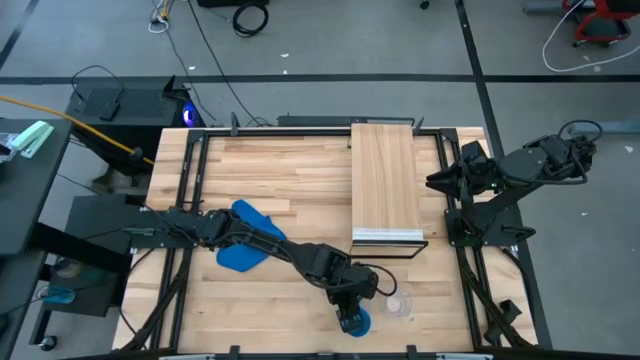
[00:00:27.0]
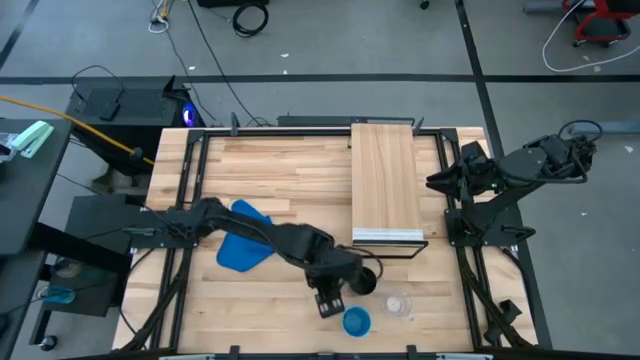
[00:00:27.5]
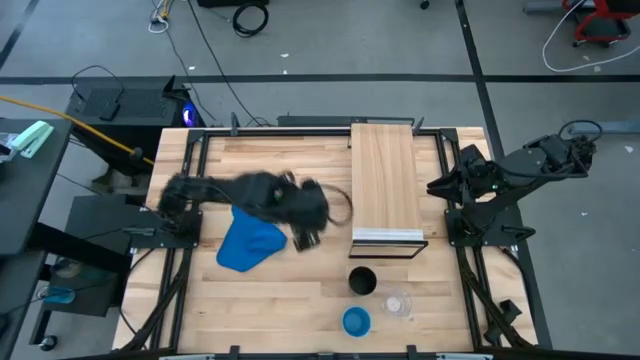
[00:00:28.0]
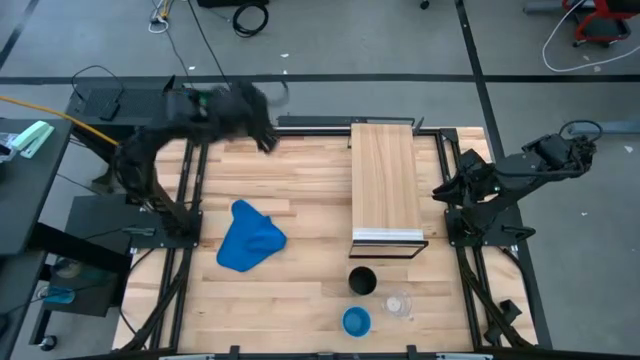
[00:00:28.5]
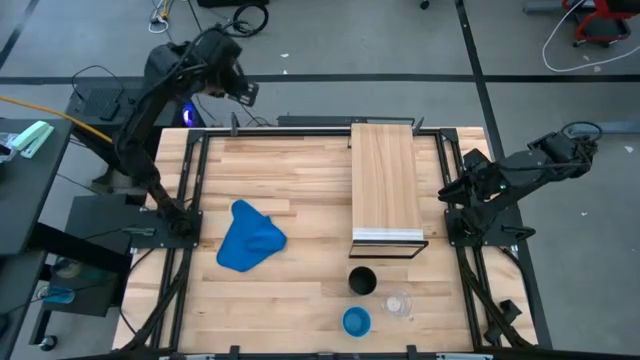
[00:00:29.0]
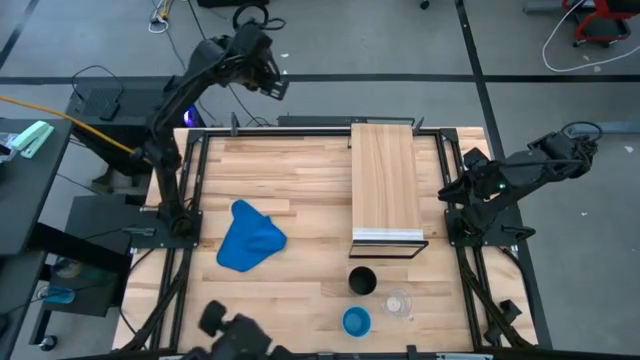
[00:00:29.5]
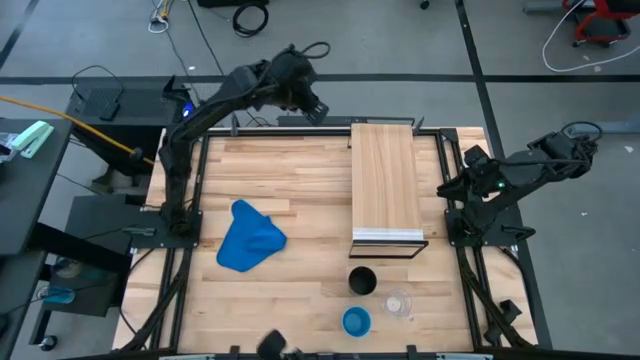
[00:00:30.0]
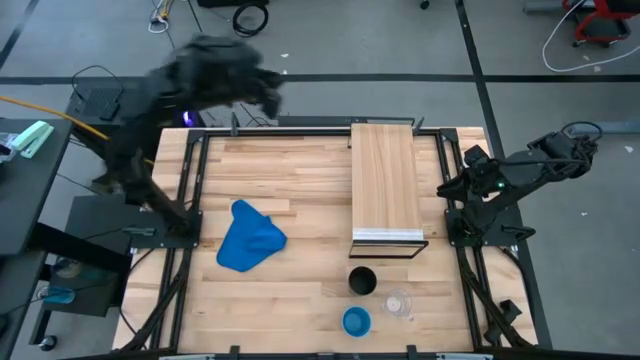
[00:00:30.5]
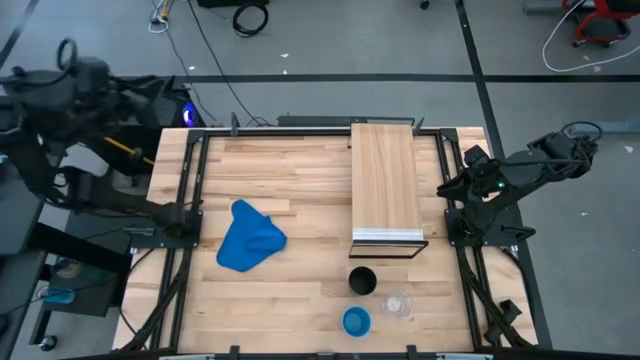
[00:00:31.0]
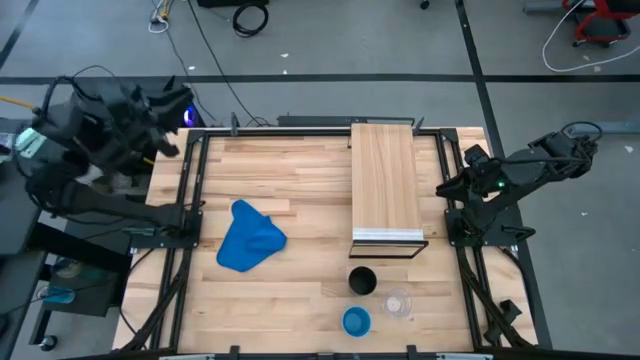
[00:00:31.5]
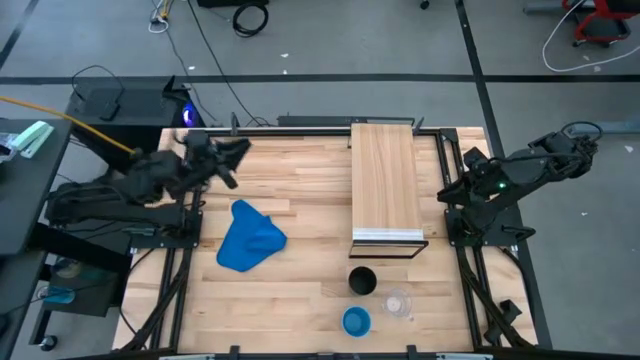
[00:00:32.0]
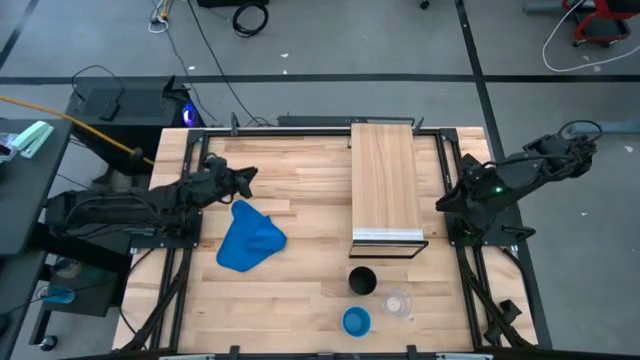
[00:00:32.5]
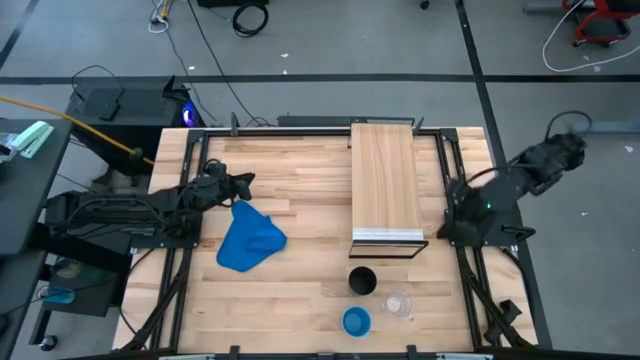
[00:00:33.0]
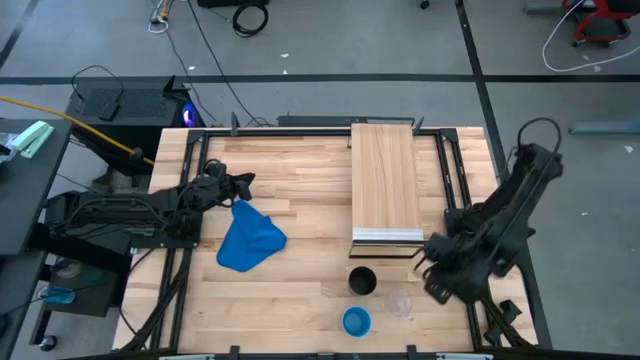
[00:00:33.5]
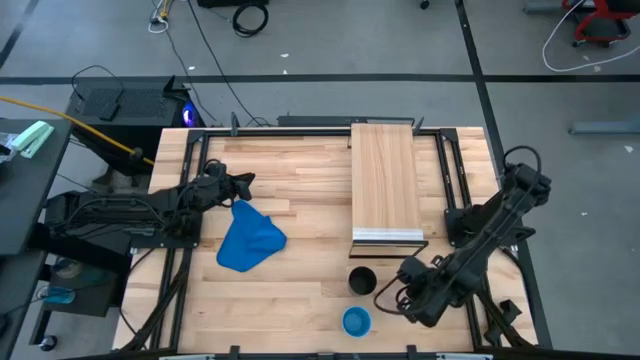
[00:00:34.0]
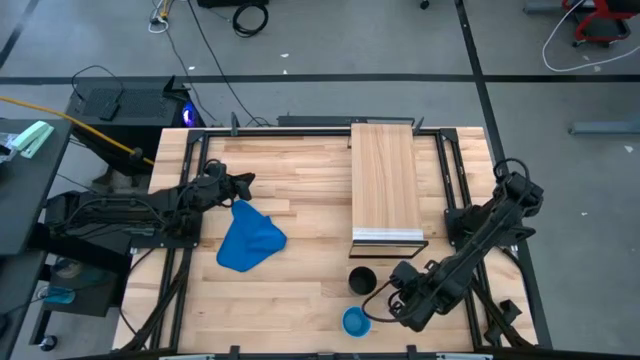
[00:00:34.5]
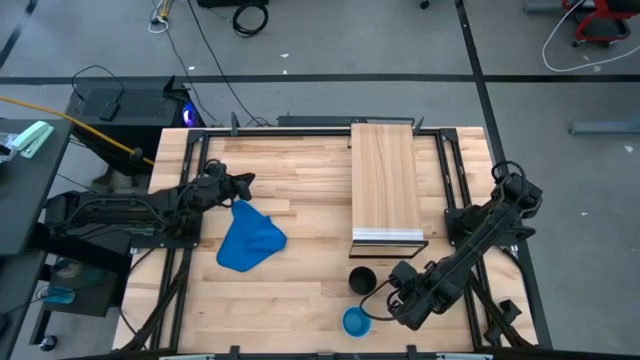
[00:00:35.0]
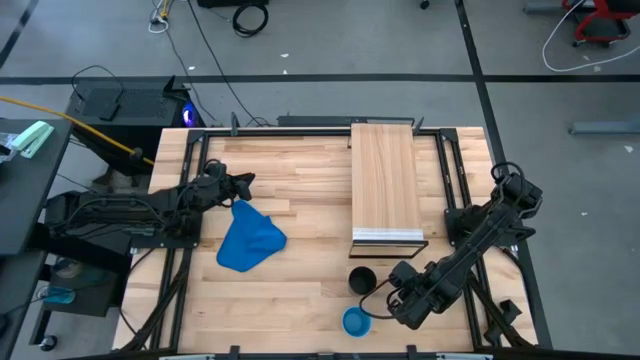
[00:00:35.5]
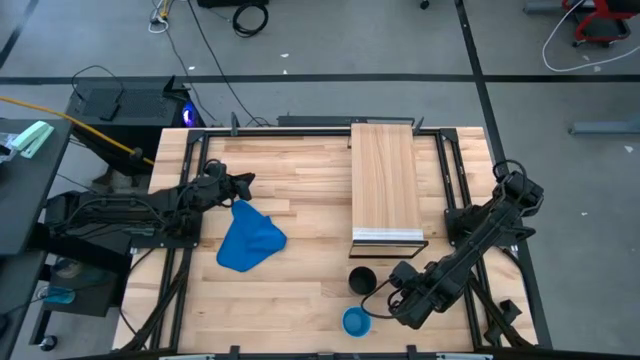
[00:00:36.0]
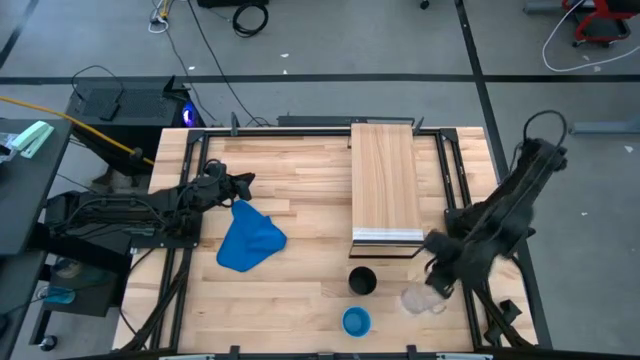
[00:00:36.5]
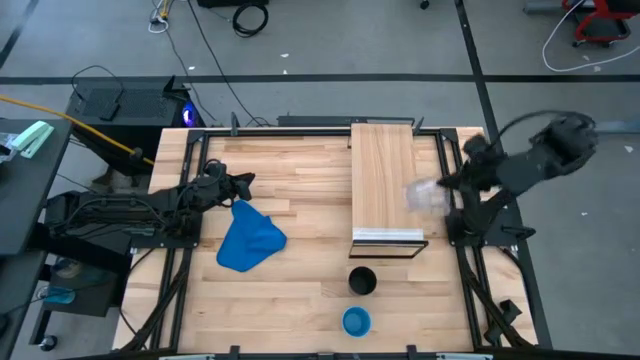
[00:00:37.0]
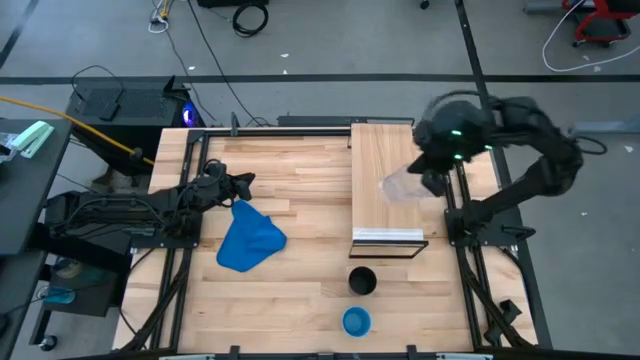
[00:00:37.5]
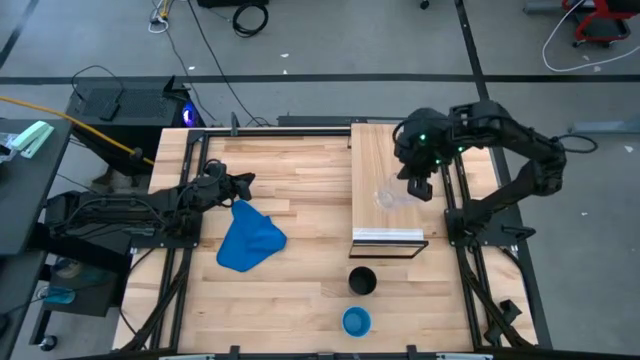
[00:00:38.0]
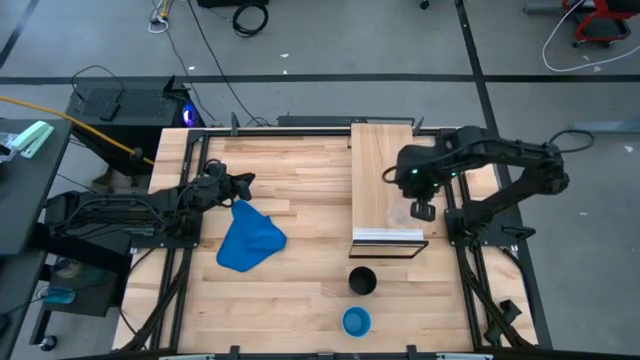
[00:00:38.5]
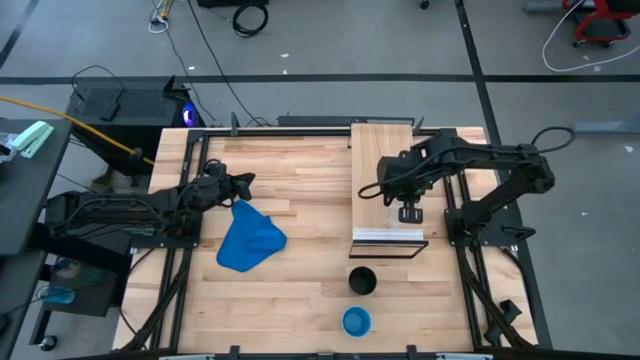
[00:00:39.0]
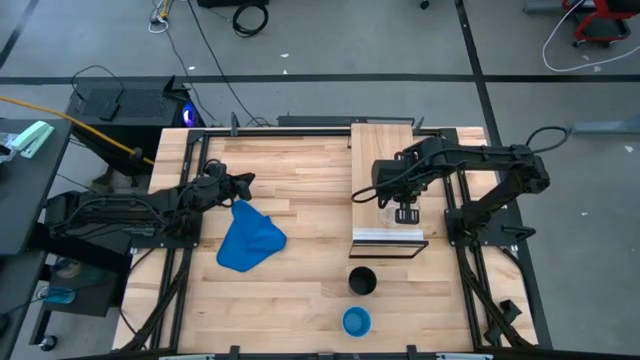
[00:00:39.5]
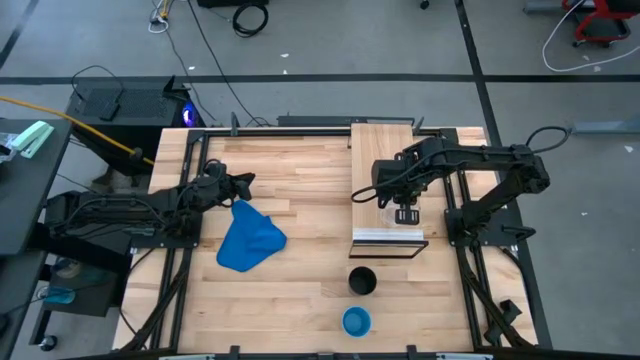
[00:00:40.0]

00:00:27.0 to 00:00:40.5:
Task: Stack small to large cups/mugs on shelf
Put the transparent mug on the shelf

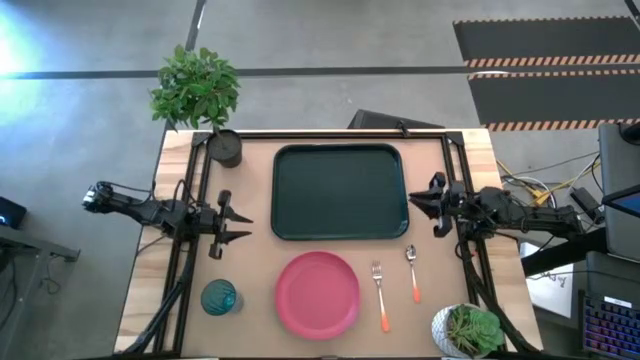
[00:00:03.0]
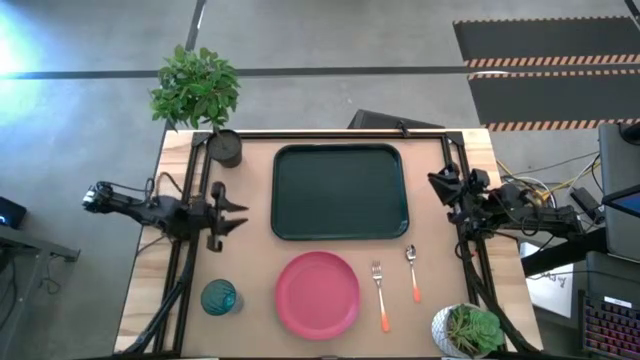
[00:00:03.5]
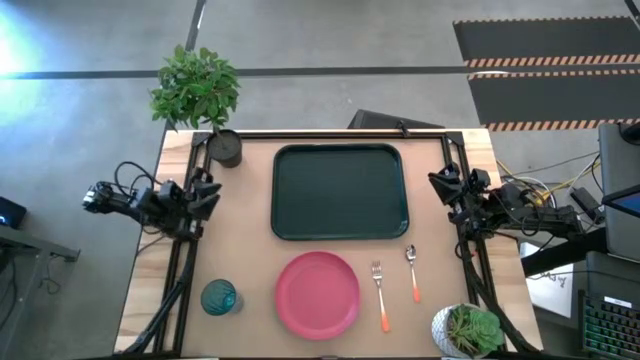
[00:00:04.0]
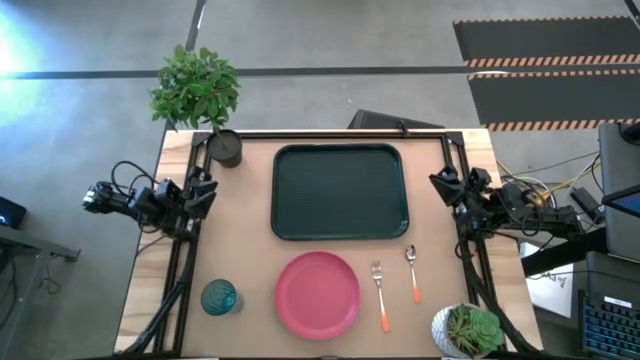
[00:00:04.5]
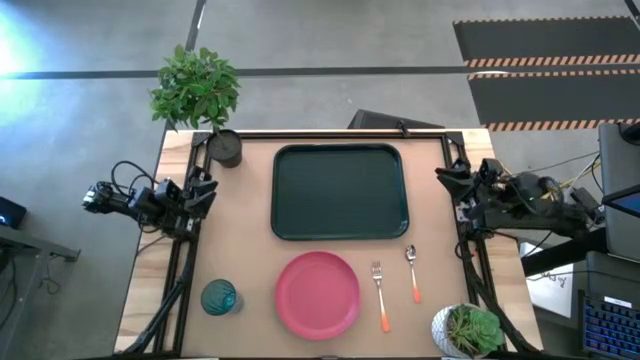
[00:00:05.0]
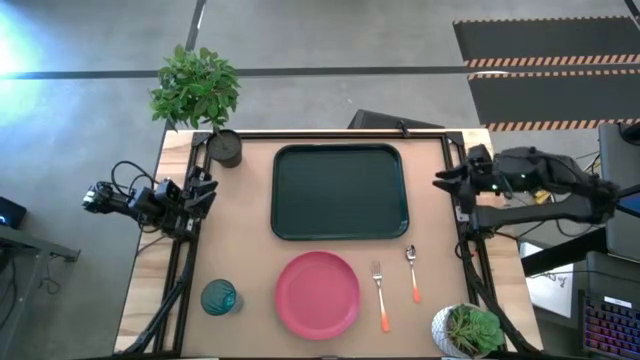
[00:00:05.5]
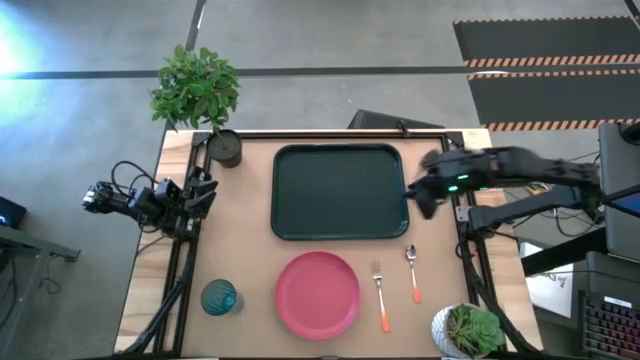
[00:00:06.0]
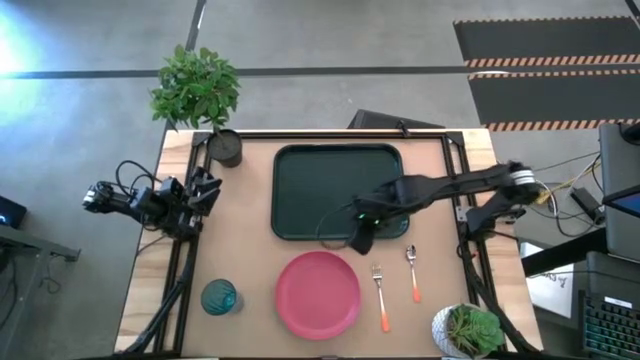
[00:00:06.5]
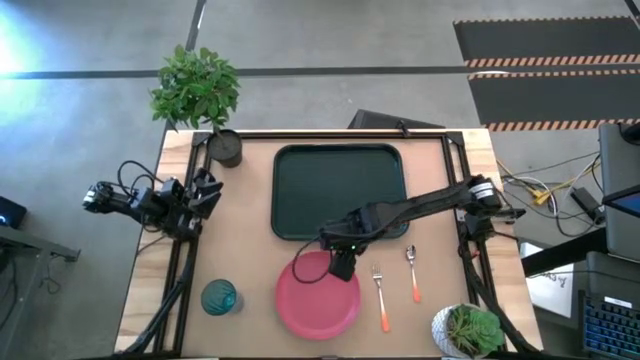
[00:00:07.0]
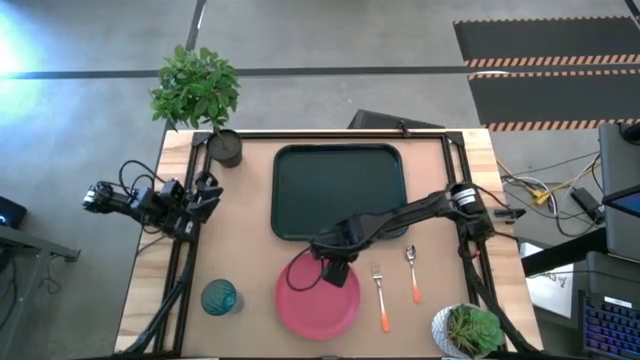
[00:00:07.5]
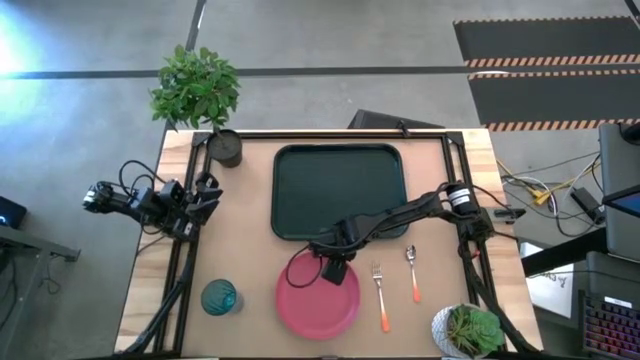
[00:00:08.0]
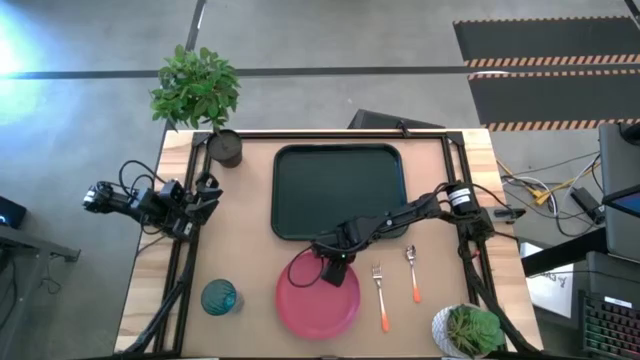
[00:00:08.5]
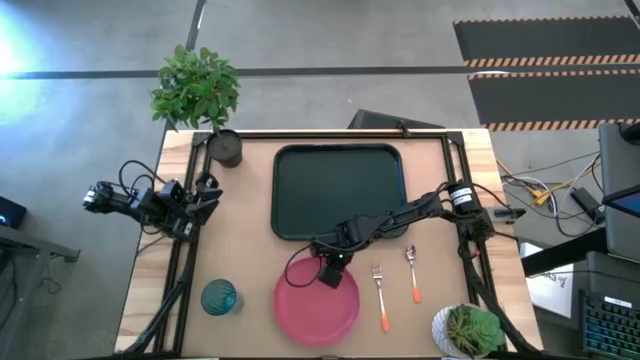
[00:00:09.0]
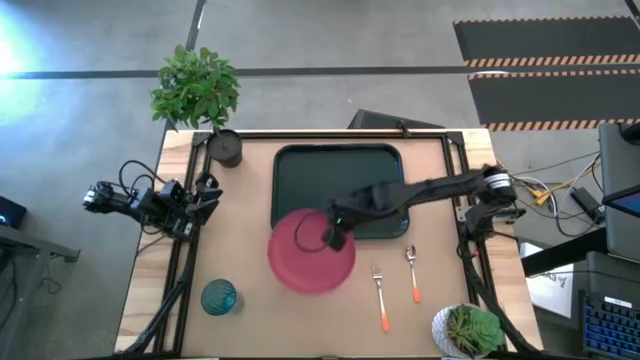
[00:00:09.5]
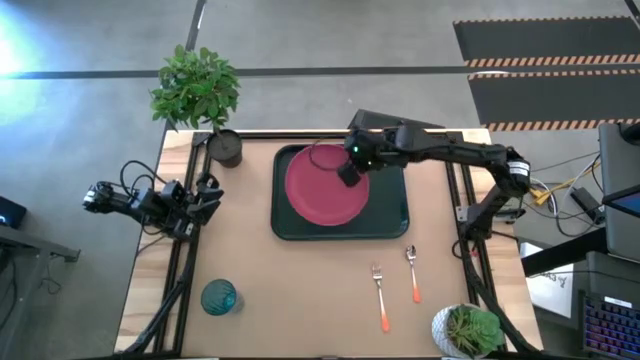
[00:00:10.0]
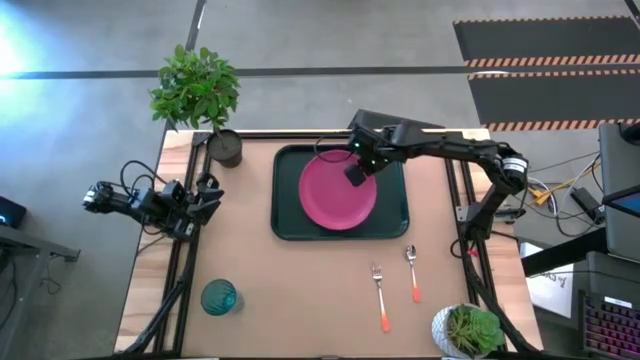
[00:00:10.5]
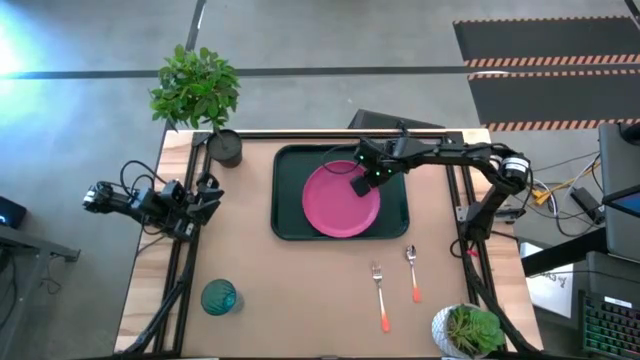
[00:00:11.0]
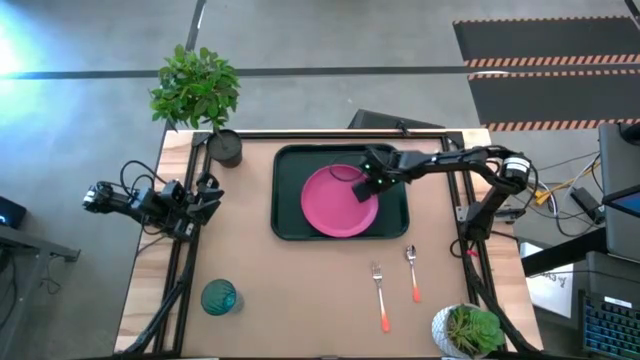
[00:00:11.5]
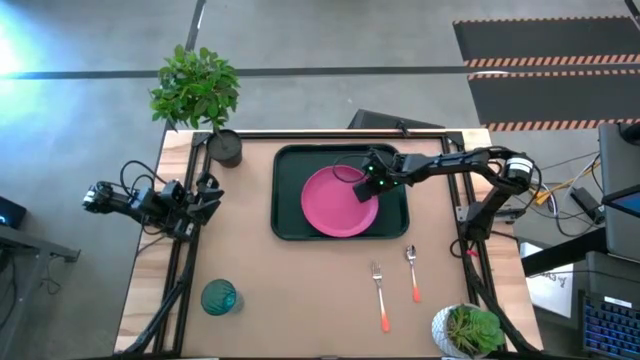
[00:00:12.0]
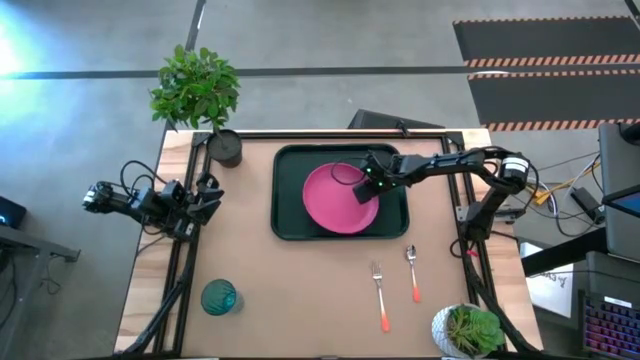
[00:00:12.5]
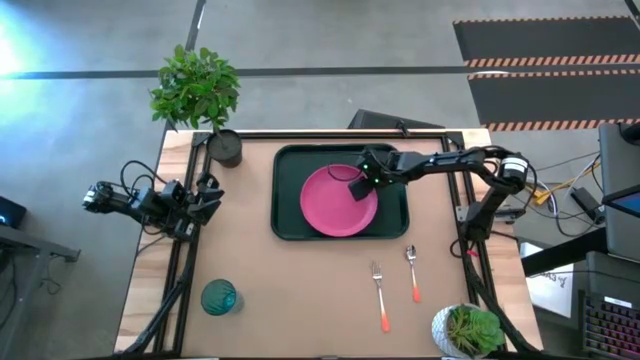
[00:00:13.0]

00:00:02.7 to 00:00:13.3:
Task: Pick and place plate/cup/fork/spoon on tray
Put the pink plate on the black tray
